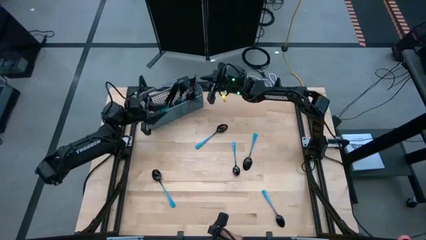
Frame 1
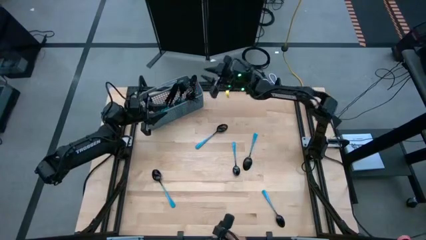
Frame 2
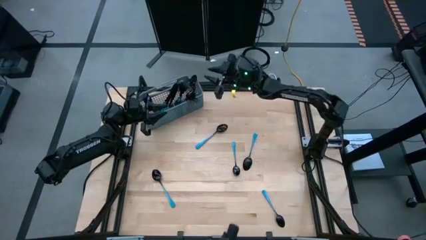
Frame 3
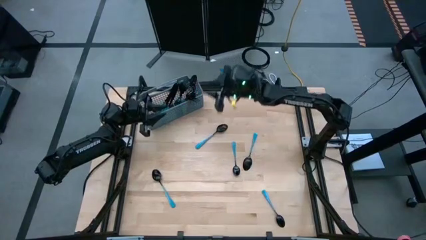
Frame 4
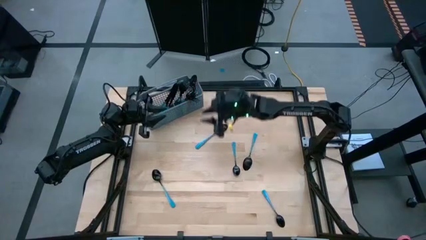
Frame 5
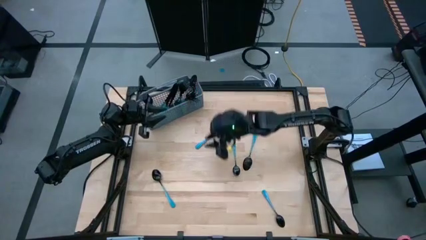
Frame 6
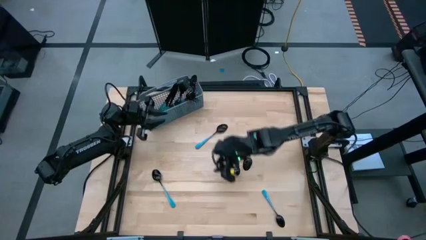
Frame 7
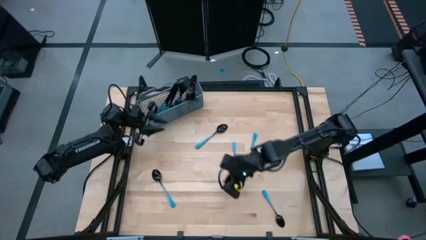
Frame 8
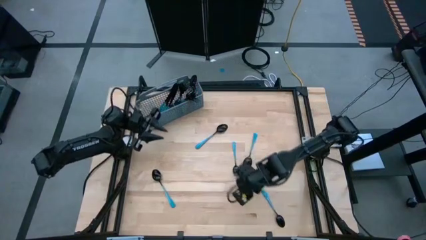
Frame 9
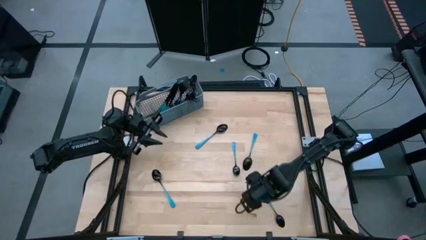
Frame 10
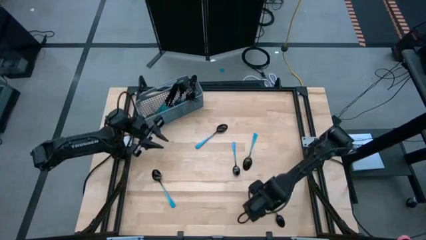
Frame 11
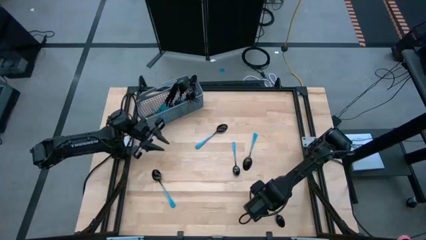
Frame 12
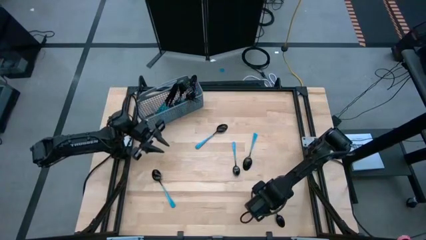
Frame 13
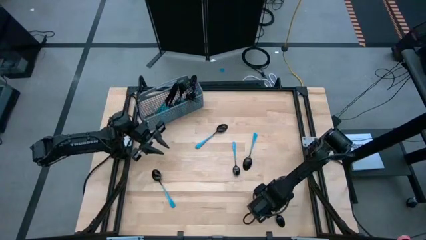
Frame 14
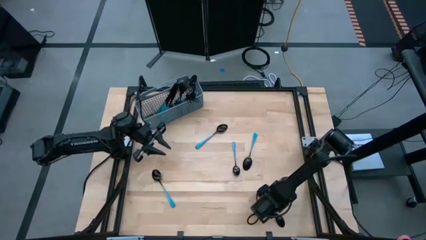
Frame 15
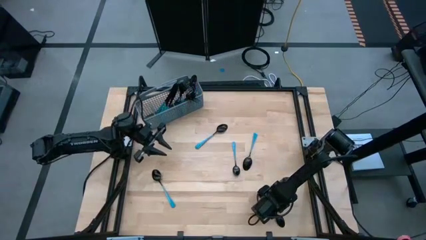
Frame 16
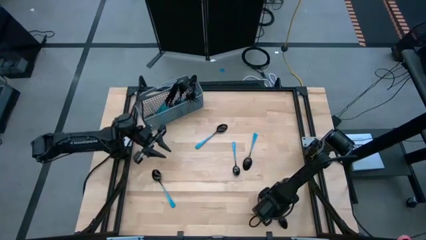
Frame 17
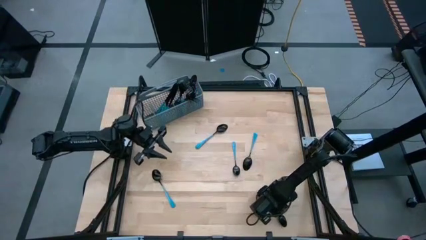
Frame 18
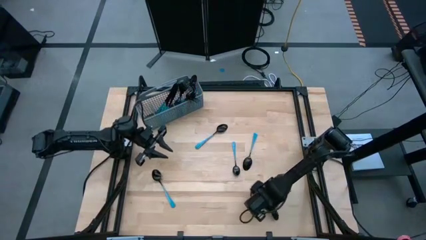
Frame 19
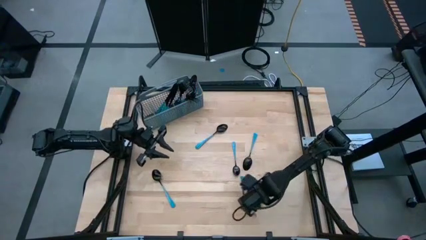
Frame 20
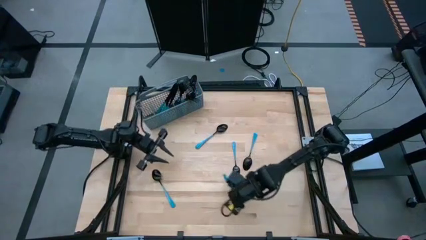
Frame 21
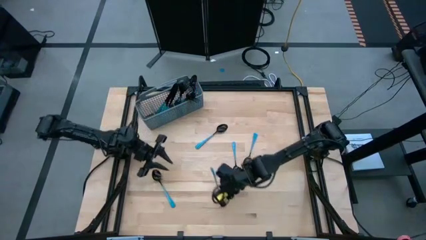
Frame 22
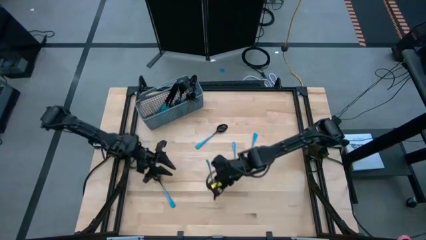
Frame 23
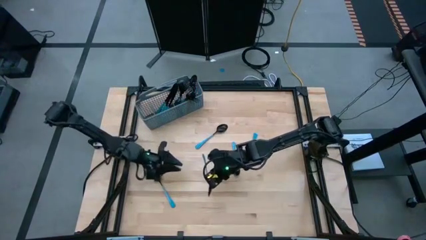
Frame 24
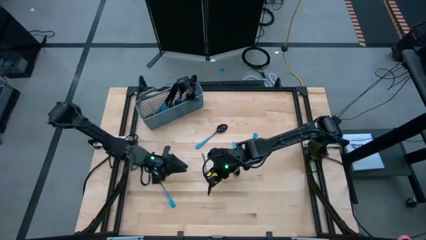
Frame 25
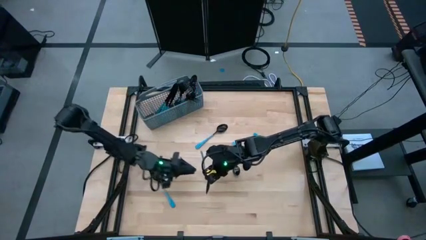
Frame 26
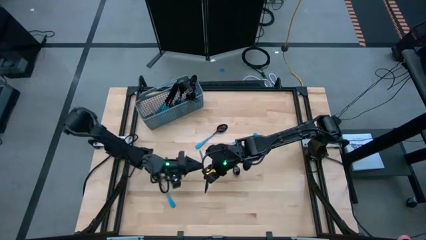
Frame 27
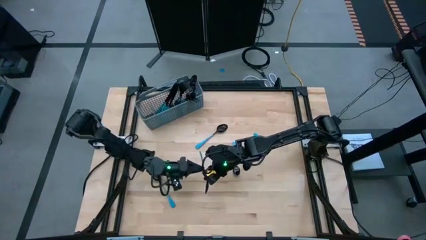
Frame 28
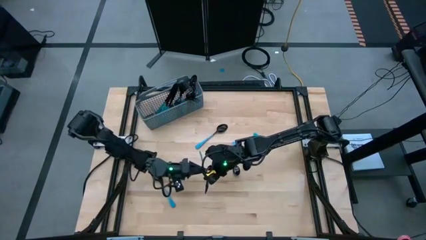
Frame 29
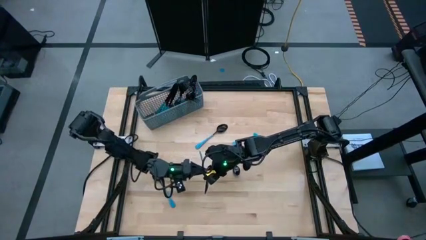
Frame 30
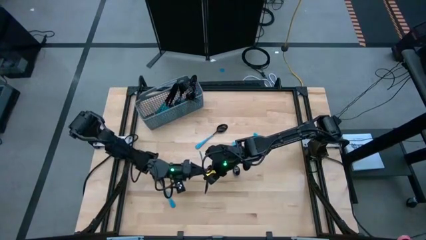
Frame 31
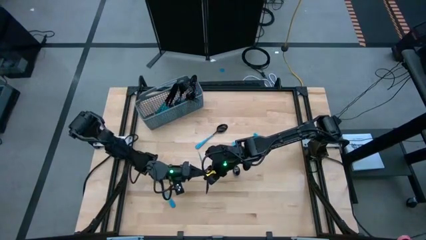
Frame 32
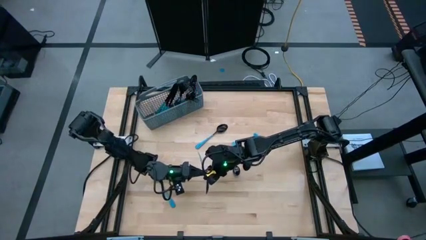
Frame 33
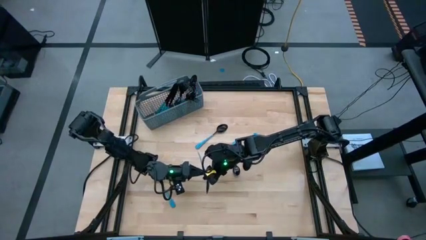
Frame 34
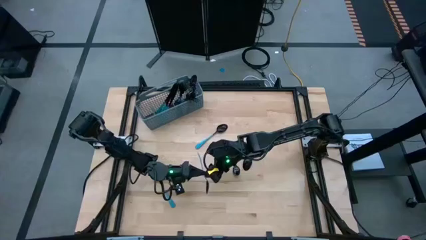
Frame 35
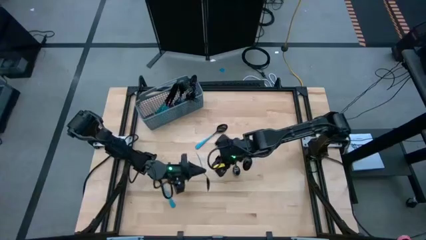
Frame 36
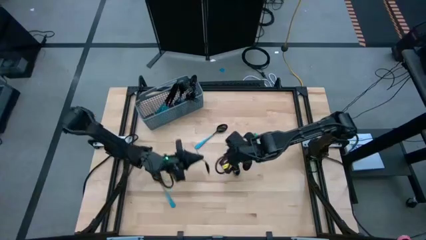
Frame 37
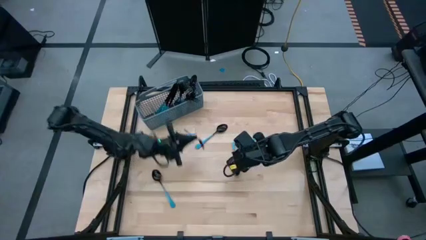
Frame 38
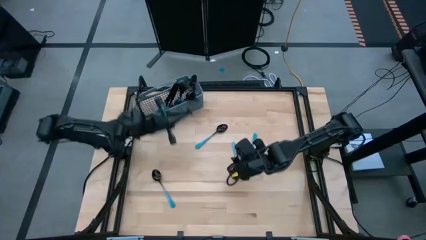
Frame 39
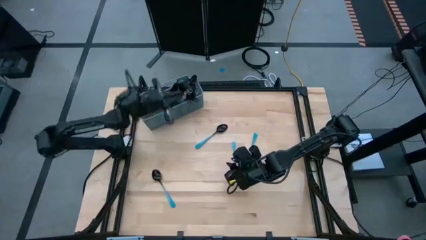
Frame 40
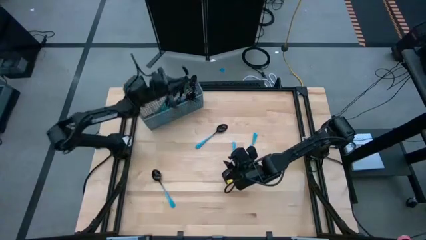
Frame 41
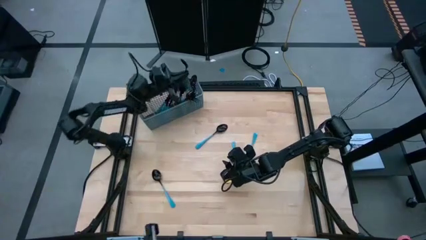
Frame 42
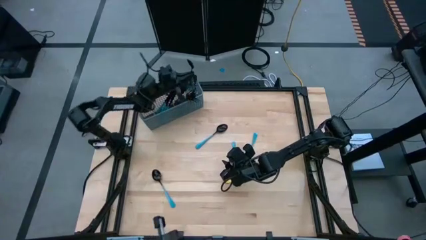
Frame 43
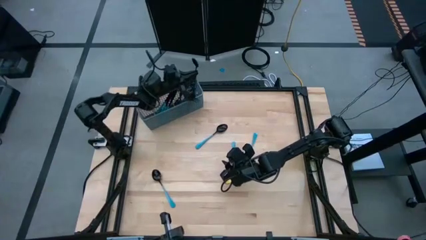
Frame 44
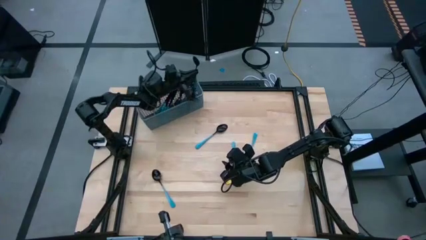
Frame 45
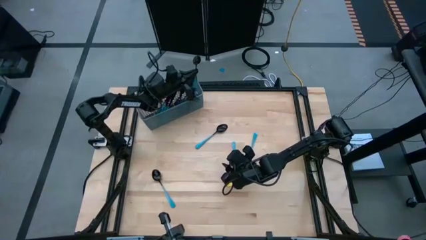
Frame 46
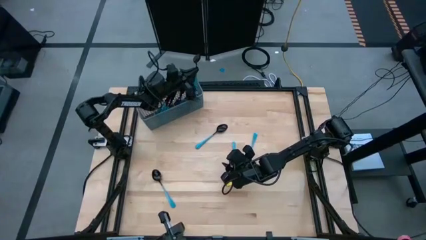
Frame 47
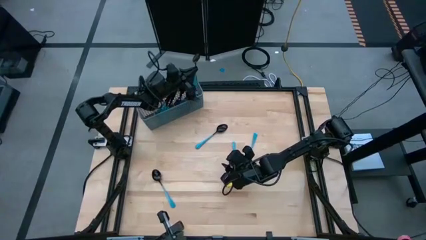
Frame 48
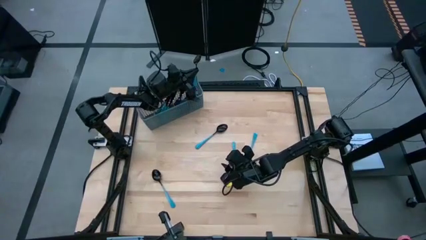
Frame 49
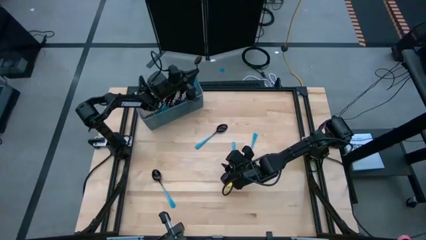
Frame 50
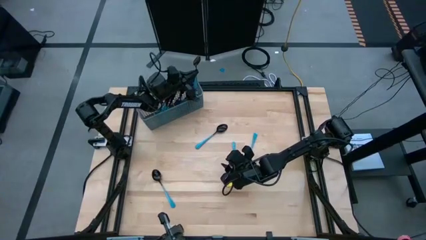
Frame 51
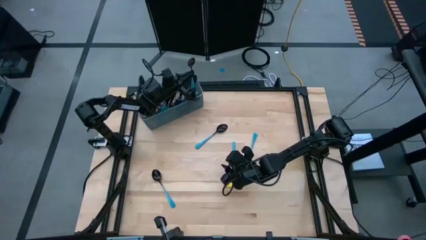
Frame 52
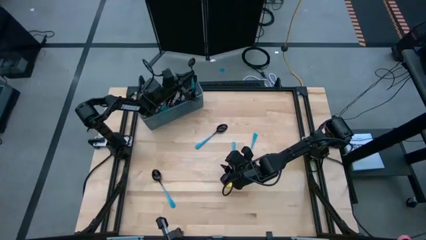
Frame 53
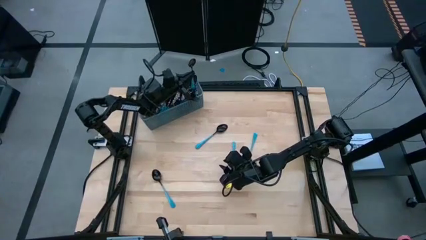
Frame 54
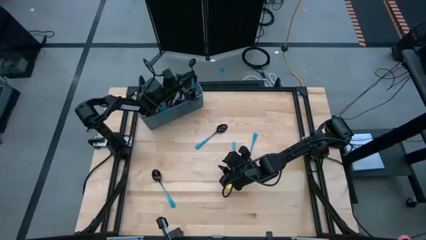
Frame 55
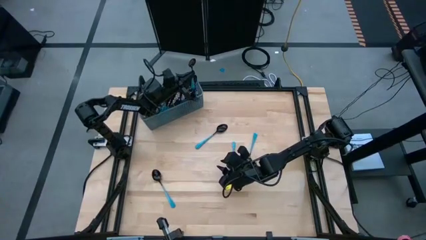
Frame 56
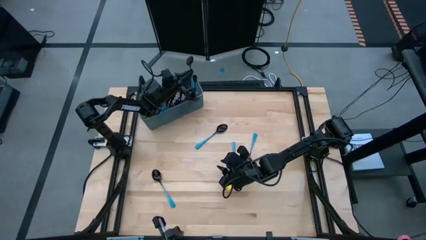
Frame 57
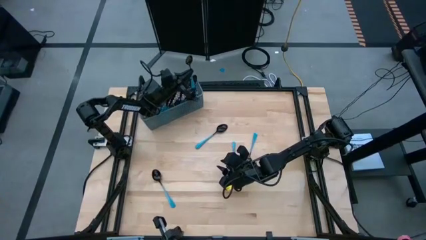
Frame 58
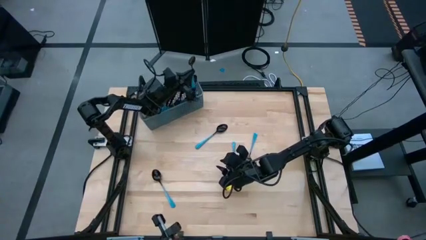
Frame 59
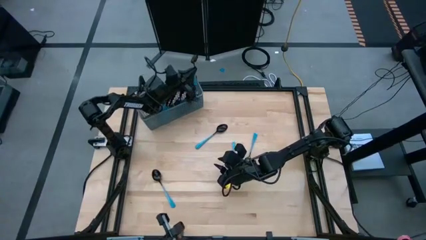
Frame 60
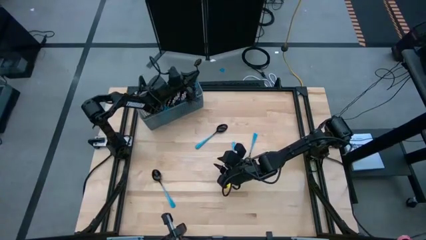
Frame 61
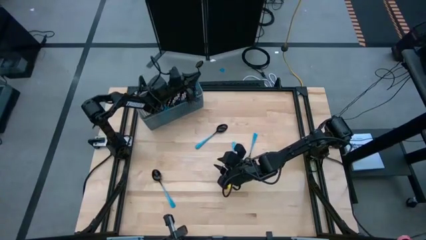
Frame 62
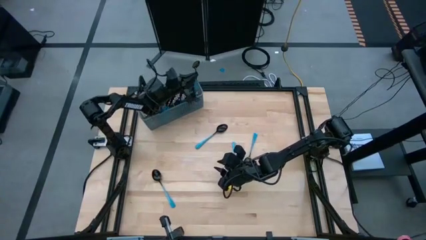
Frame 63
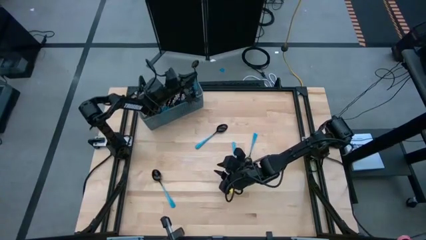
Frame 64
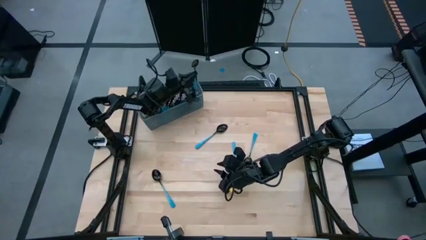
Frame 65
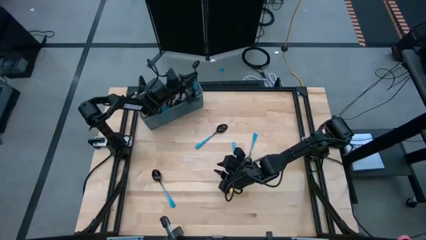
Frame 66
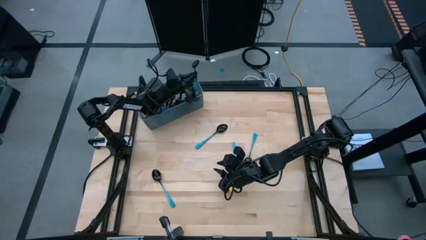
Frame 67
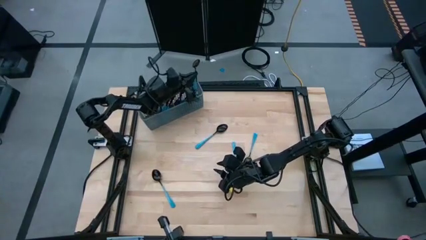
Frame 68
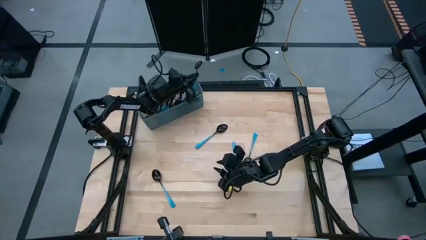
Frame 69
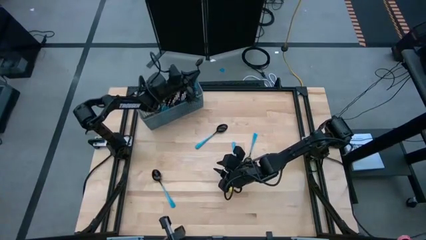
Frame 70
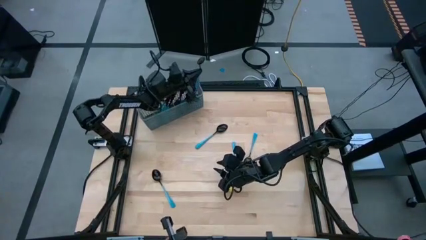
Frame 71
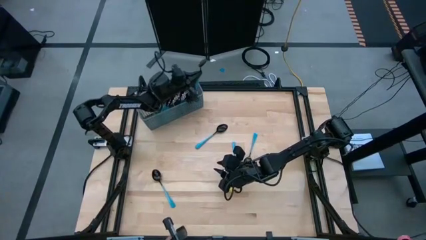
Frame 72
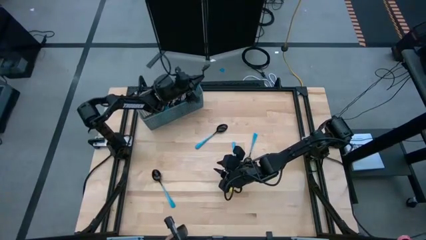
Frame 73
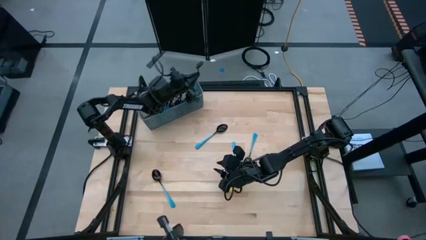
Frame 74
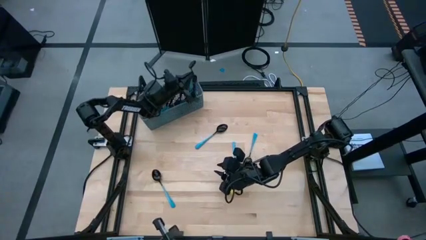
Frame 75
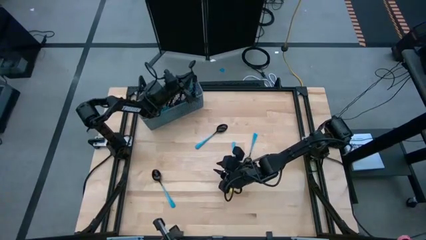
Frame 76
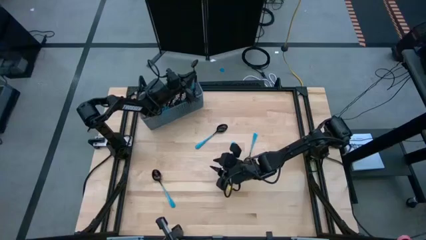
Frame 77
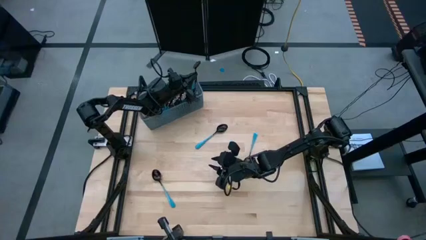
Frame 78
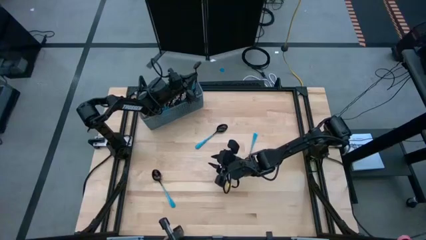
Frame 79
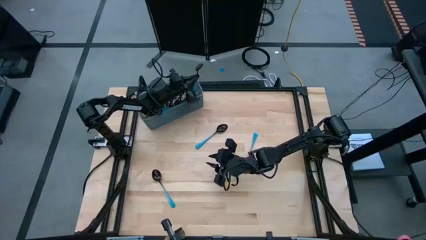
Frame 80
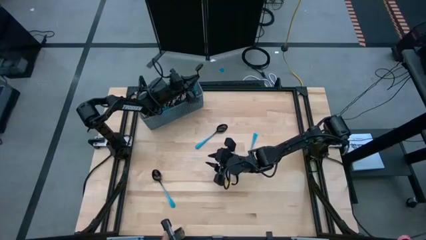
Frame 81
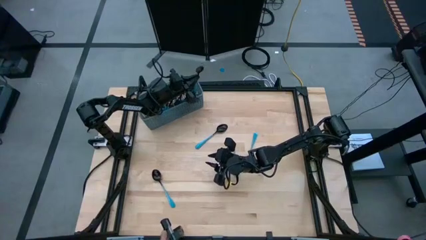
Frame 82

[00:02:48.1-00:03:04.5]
Task: Sort silverware
Put the blue spoon in the silverware rack
